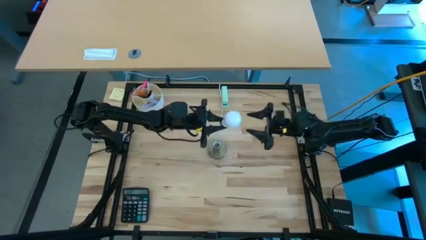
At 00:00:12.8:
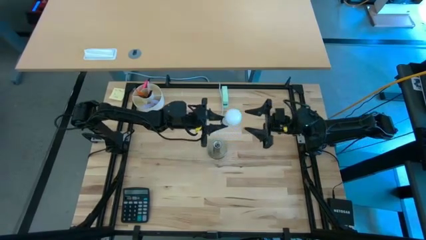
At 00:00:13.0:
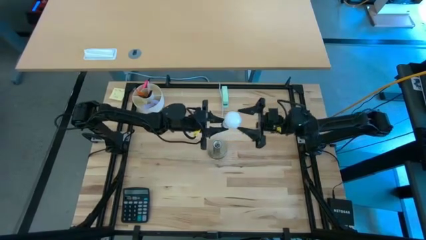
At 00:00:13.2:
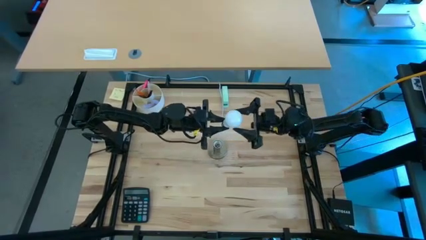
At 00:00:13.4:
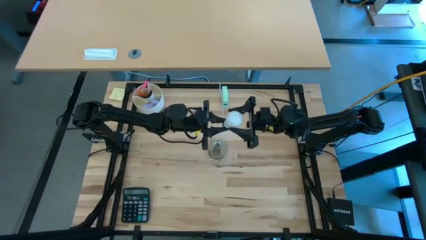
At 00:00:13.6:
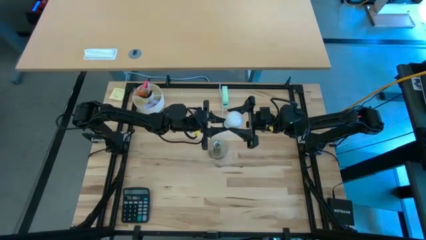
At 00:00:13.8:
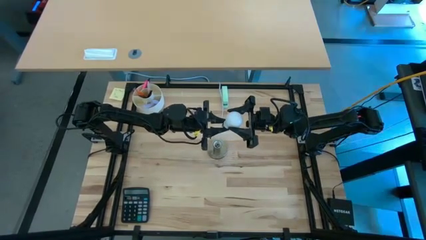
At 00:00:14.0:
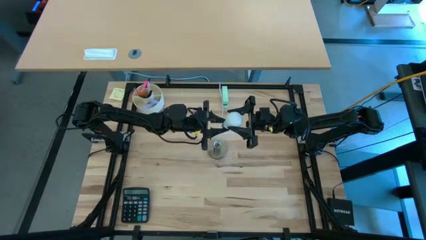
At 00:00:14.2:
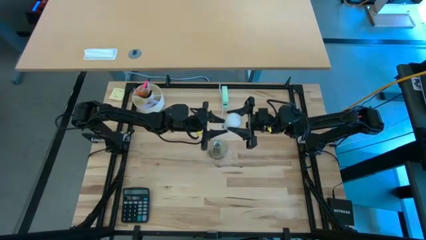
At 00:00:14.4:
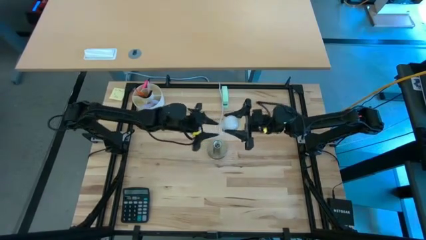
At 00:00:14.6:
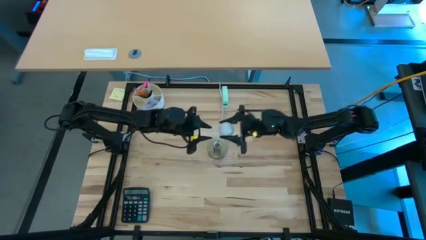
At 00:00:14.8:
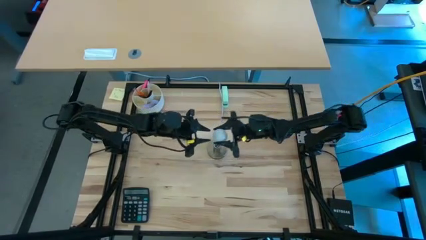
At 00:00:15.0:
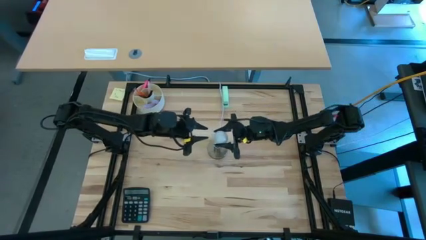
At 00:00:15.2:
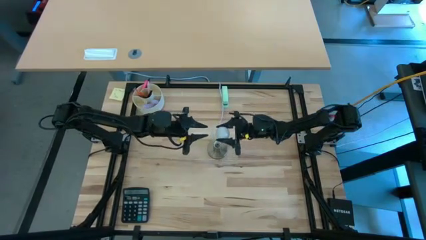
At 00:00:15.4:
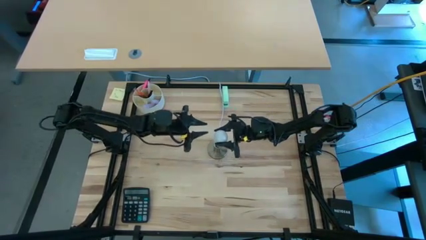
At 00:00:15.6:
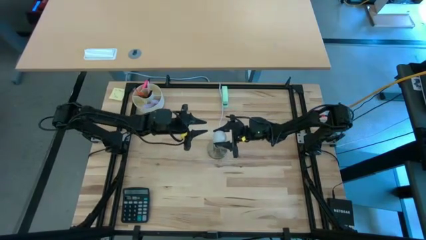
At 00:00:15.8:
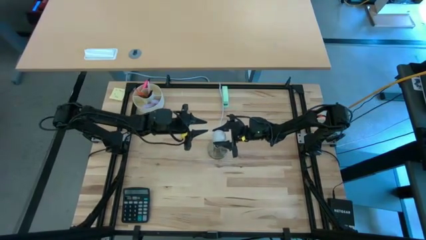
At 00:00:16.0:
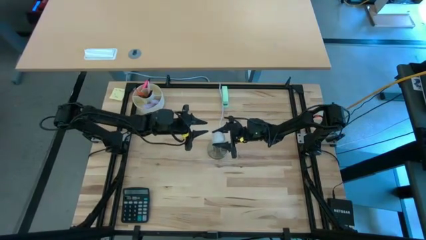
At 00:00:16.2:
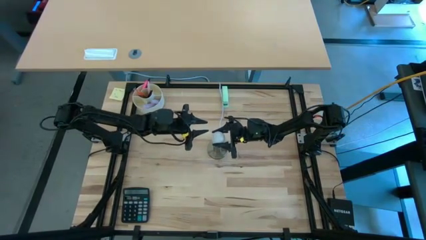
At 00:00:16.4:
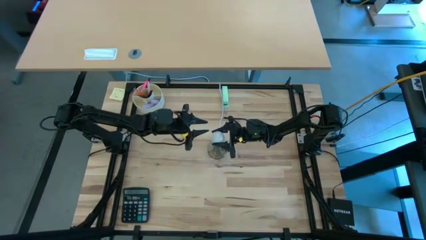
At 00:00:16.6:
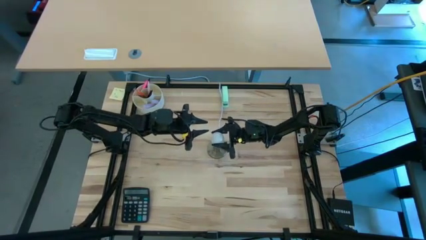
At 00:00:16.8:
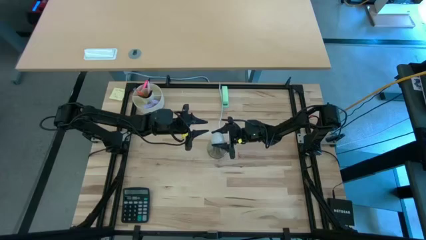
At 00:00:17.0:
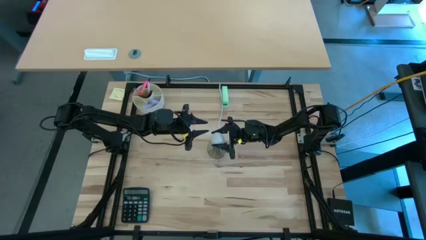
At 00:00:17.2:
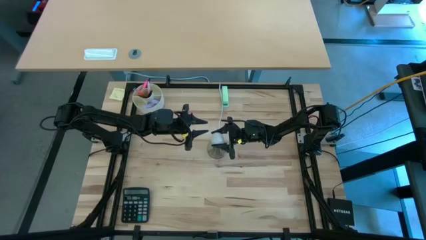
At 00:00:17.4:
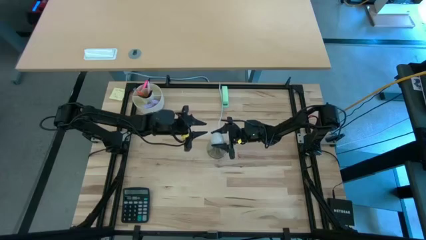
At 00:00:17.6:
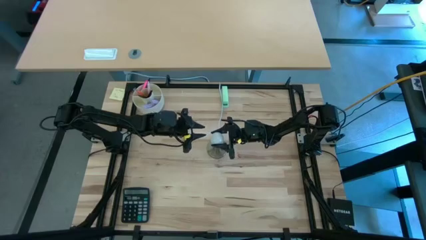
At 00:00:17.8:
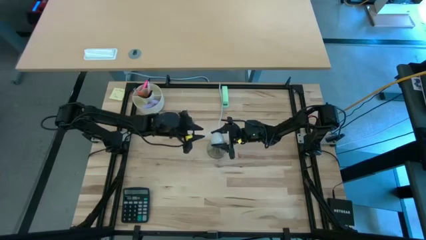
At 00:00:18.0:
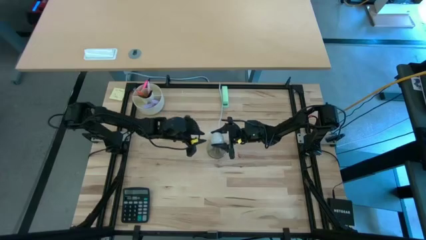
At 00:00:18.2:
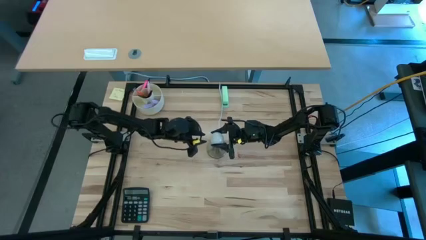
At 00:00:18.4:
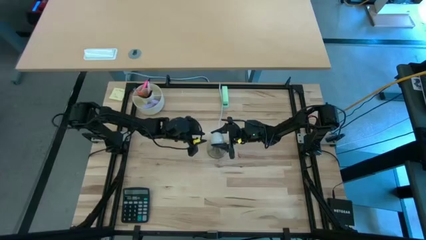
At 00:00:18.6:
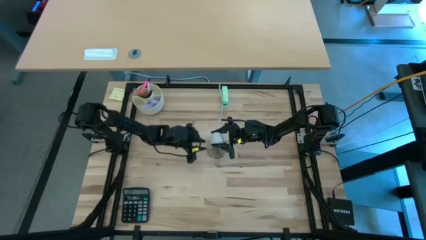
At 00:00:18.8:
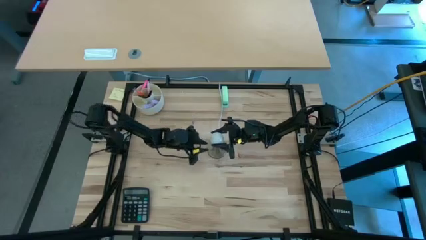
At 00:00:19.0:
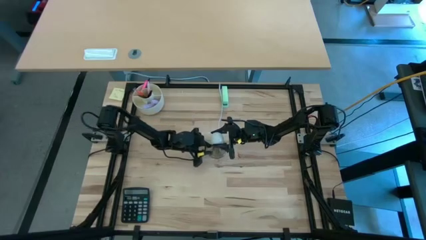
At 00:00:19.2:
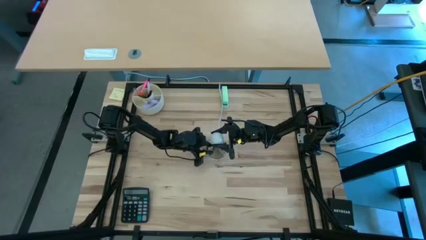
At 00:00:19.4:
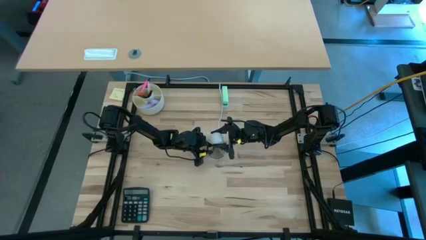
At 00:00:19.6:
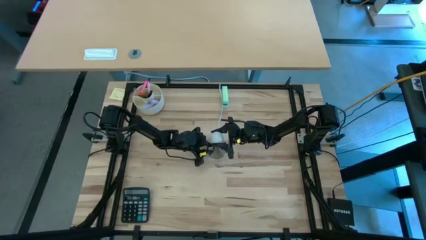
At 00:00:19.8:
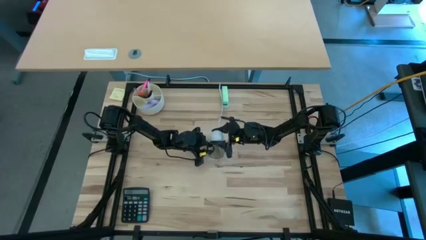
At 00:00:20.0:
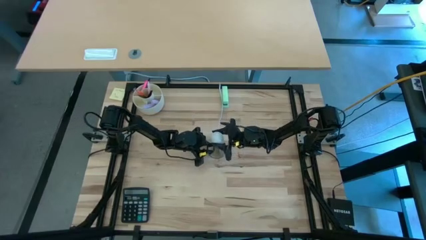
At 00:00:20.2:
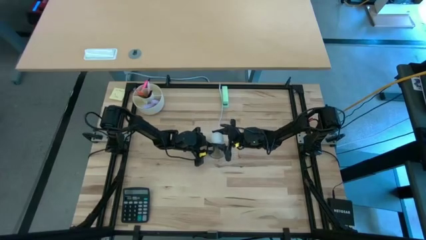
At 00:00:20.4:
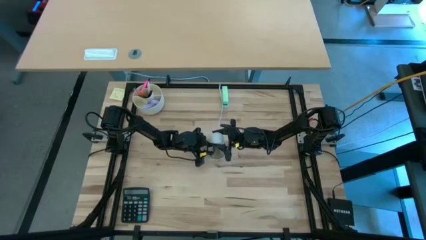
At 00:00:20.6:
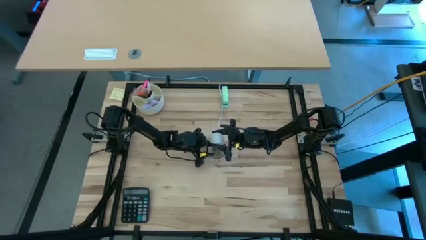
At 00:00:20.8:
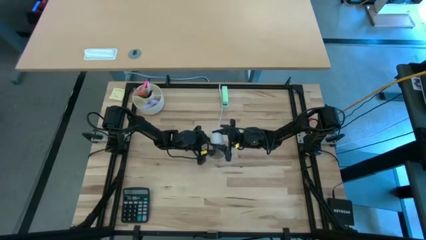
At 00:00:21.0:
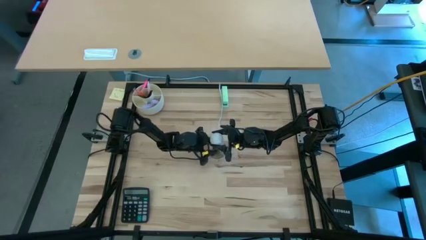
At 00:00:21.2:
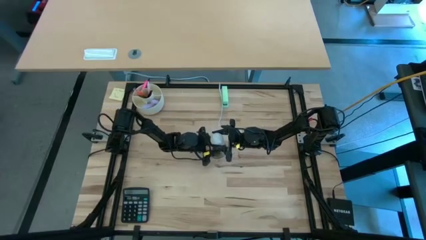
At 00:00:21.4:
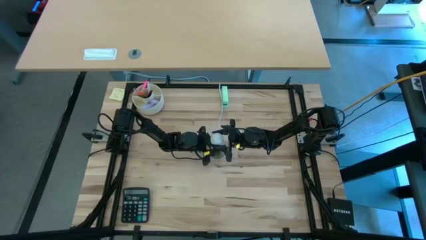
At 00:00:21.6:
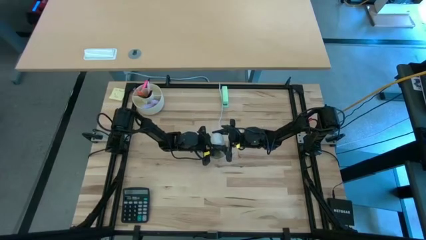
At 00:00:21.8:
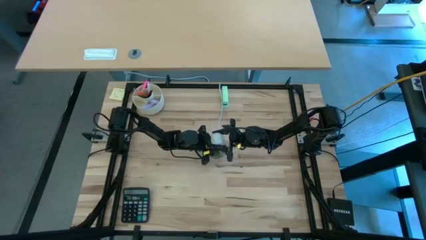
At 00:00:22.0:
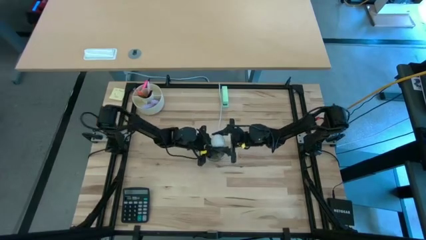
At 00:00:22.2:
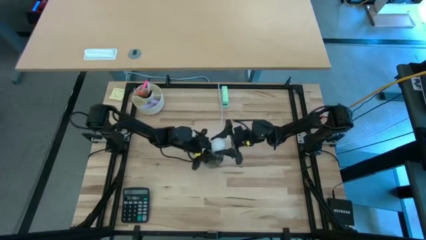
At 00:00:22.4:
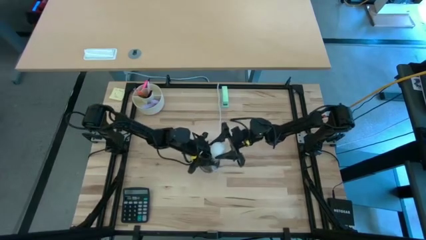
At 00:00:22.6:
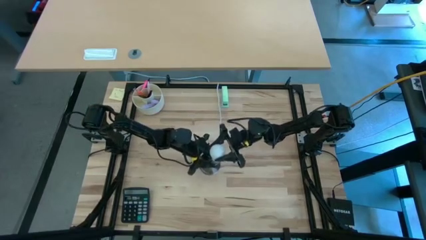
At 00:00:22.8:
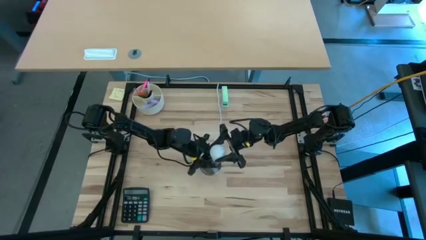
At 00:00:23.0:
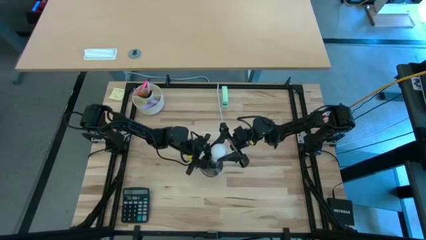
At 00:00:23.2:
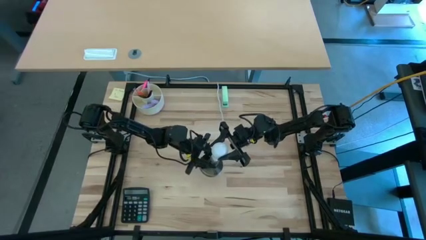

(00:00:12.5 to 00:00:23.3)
Task: Screw lightbulb
Insert the lightbulb into the lamp

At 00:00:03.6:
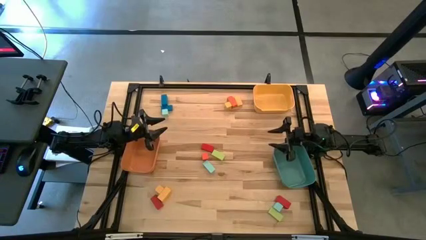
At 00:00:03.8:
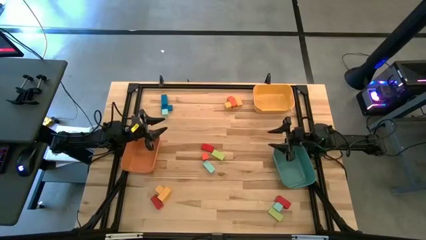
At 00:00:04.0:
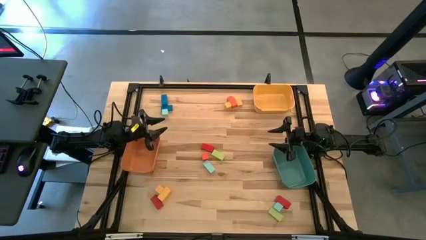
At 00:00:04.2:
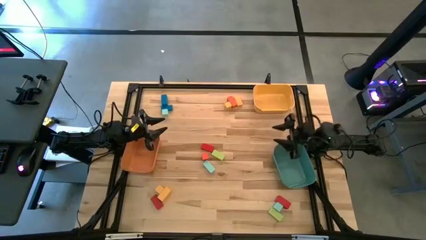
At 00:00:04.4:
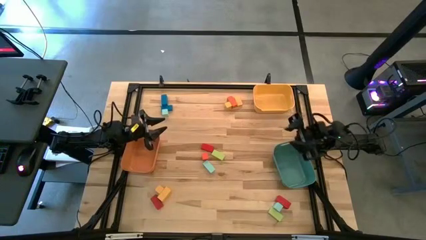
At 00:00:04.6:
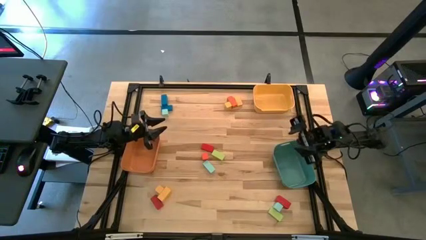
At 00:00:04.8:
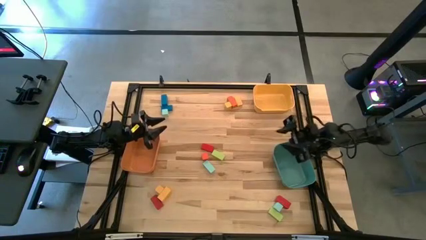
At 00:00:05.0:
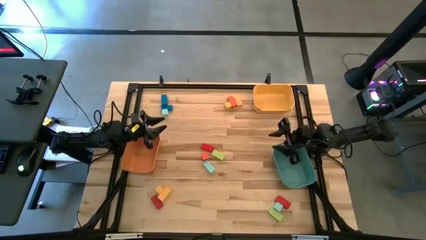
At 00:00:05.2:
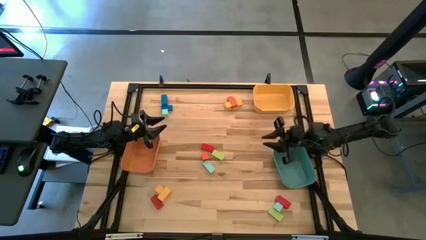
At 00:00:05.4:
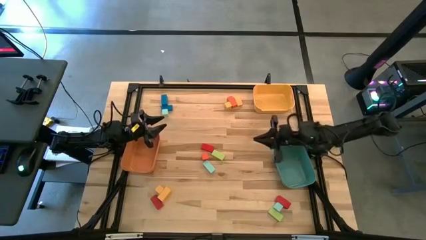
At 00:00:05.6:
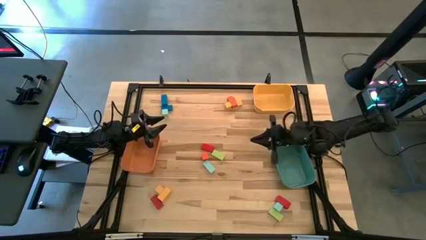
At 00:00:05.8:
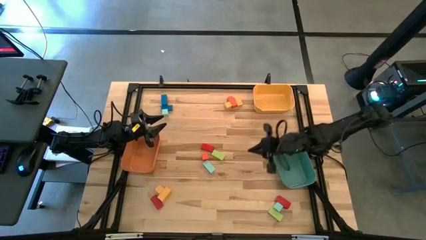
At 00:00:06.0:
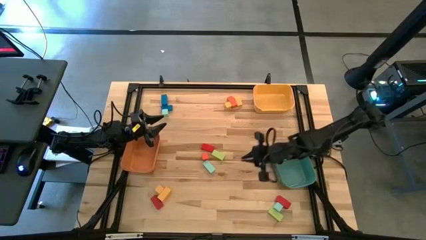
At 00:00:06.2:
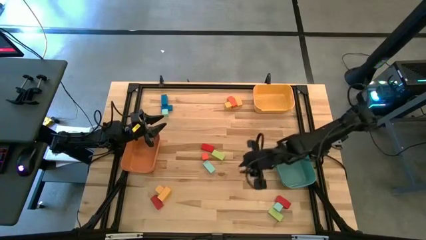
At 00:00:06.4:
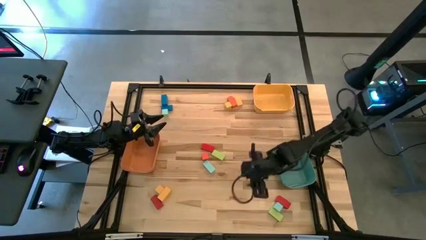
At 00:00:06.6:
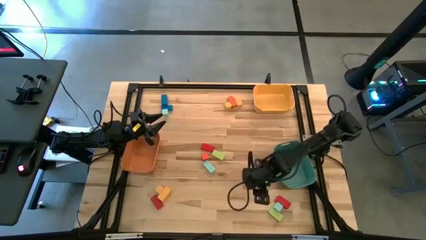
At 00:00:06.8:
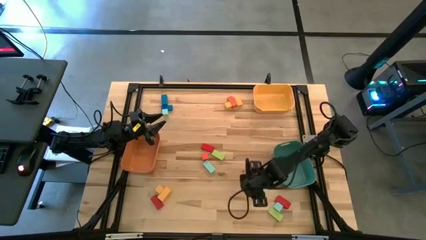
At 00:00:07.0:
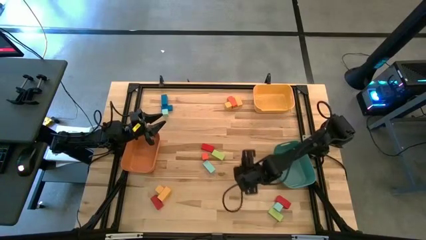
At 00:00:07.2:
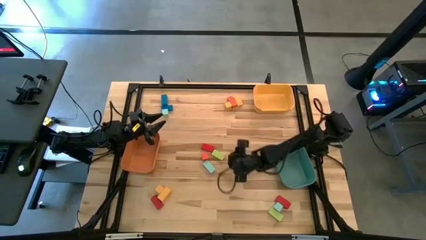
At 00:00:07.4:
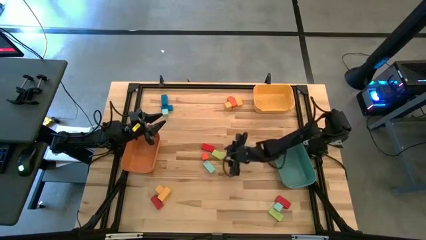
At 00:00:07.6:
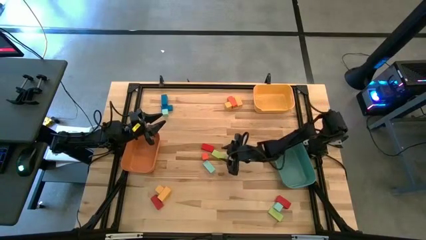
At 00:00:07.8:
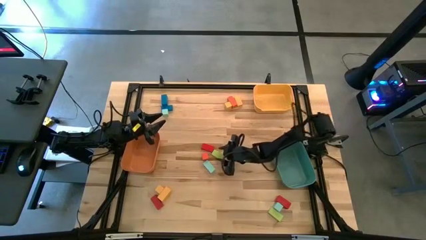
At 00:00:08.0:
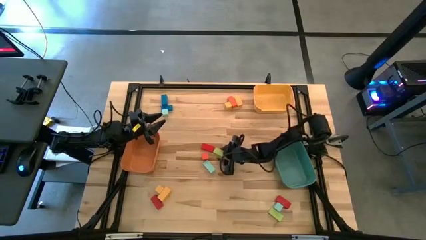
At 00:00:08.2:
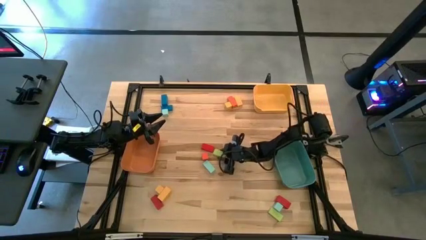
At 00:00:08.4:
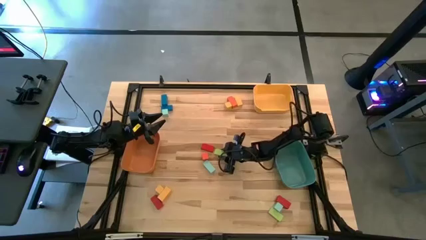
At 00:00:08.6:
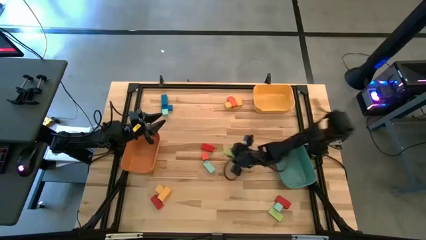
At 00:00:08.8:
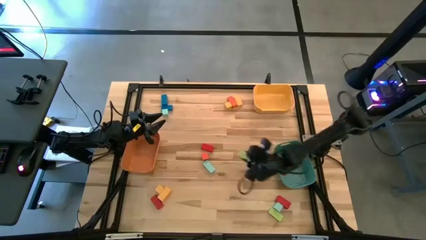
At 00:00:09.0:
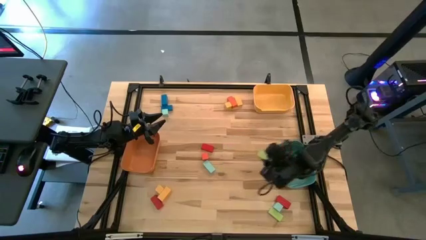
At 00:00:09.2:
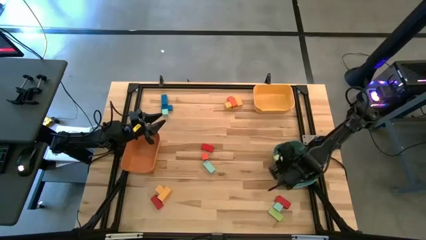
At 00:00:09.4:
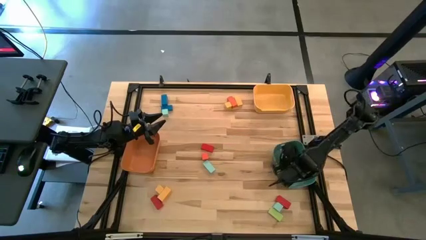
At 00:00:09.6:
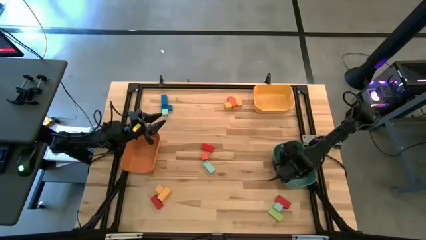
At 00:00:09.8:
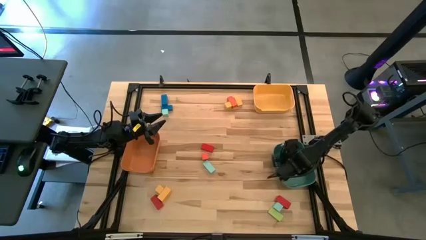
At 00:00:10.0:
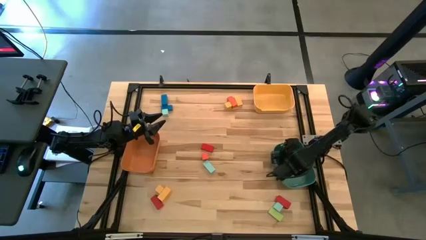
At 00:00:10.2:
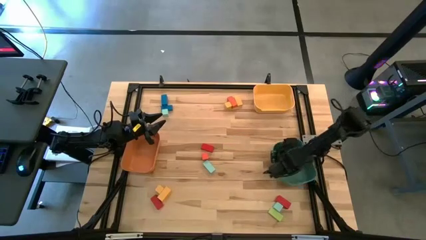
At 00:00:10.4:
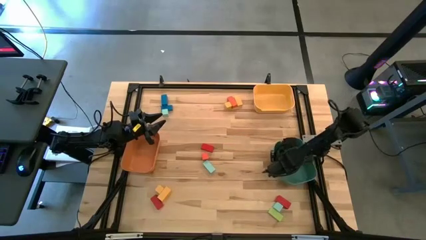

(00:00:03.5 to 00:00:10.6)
Task: Sort blocks by size
Put the top thin green rectangular block into the green bin
